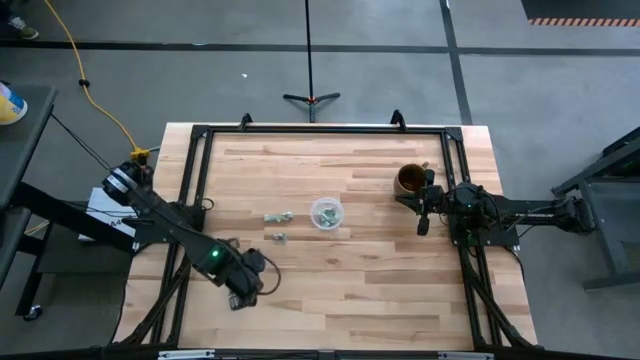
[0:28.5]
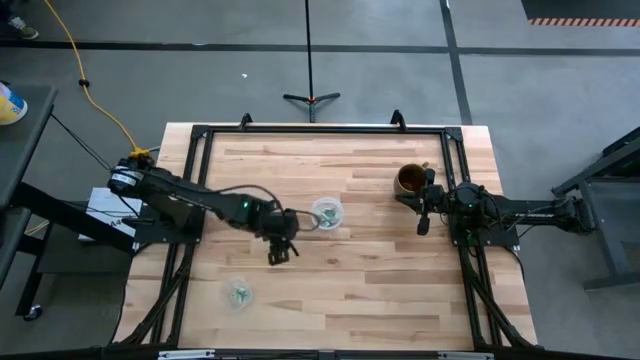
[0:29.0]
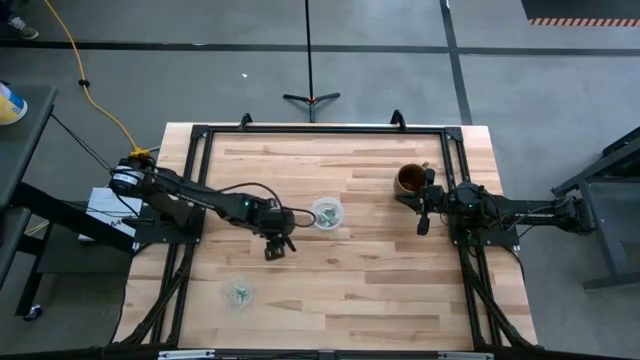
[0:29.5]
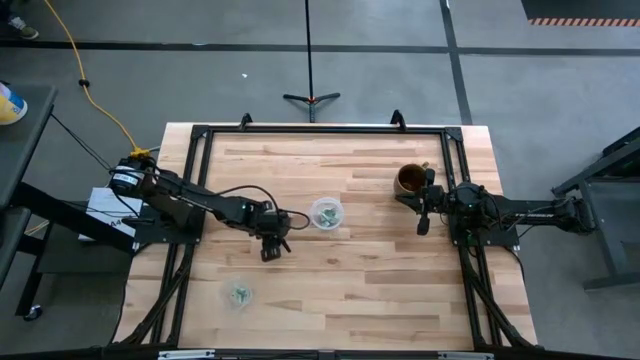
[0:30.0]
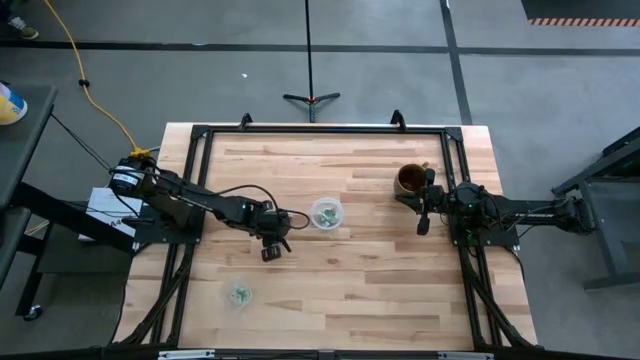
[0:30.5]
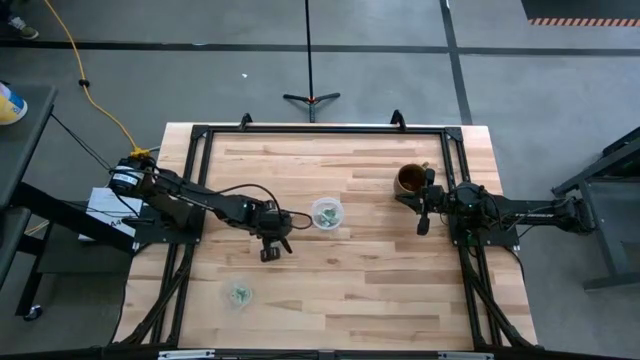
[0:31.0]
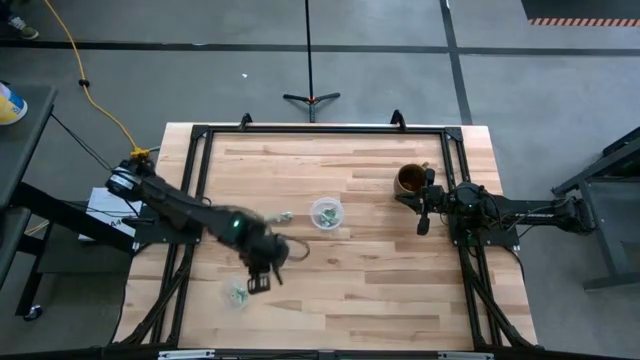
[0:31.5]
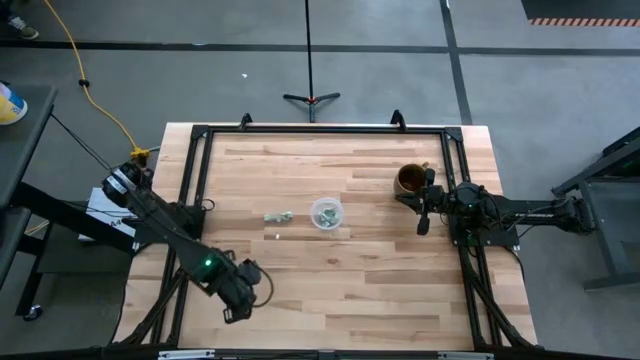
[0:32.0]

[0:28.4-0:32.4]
Task: Pick and place items into bin
Put the green stevia packet into the bottom transparent bin

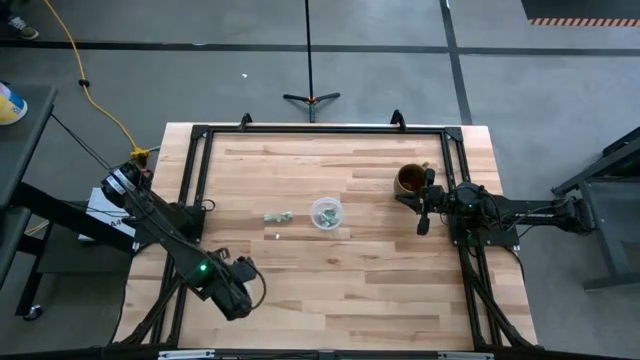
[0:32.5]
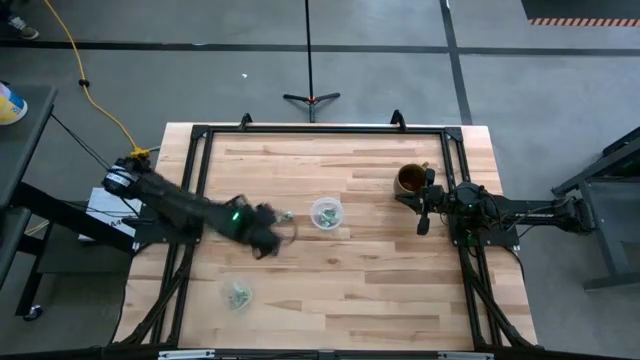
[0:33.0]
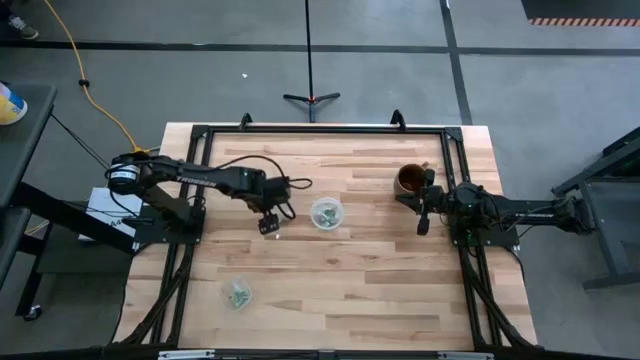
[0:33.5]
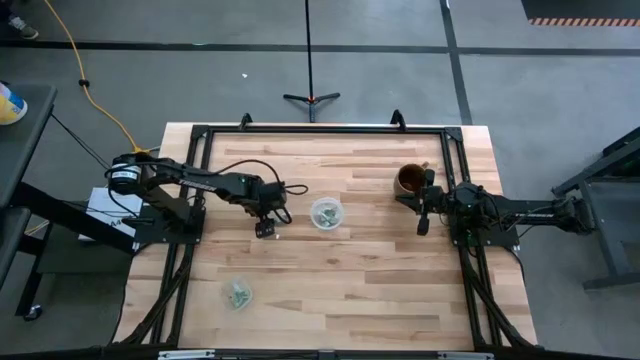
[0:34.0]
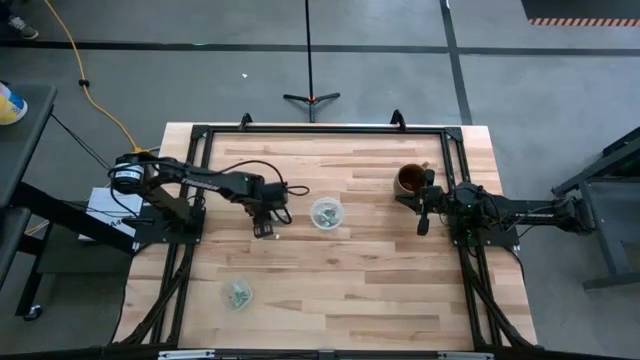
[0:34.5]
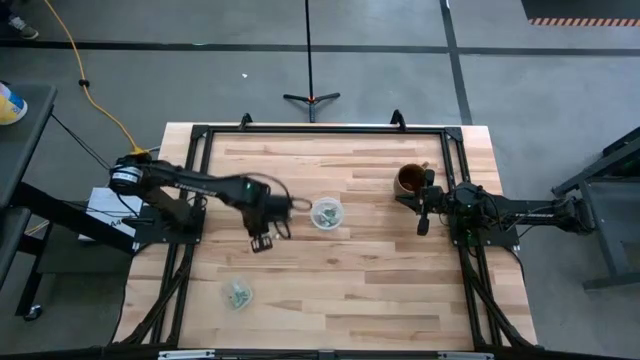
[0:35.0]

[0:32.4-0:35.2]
Put the green stevia packet into the bottom transparent bin

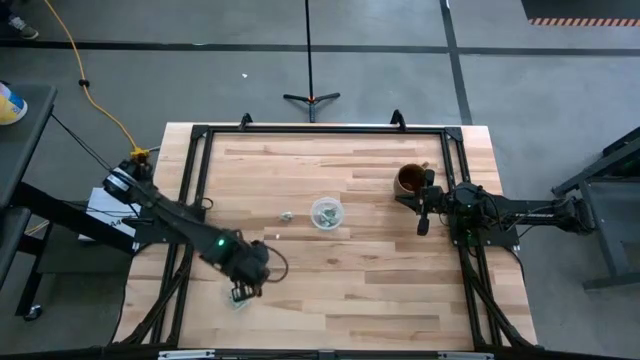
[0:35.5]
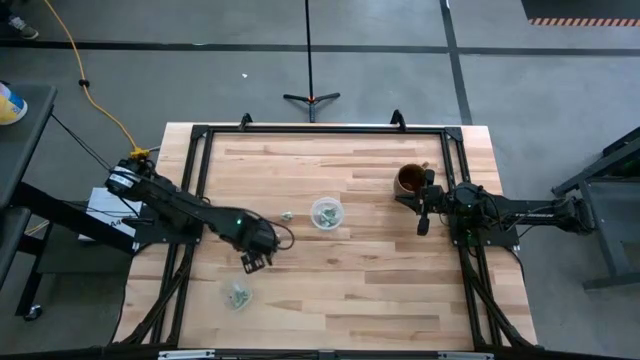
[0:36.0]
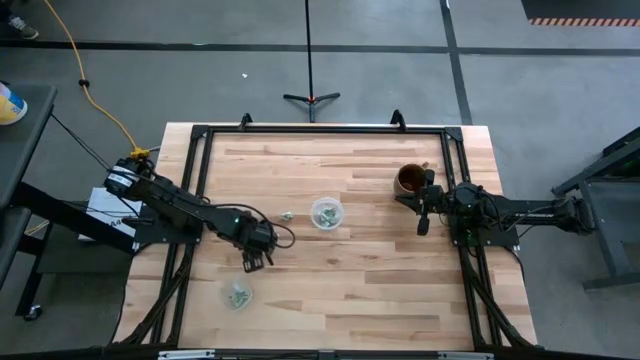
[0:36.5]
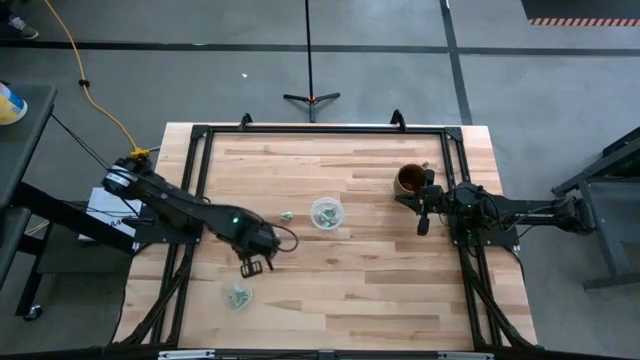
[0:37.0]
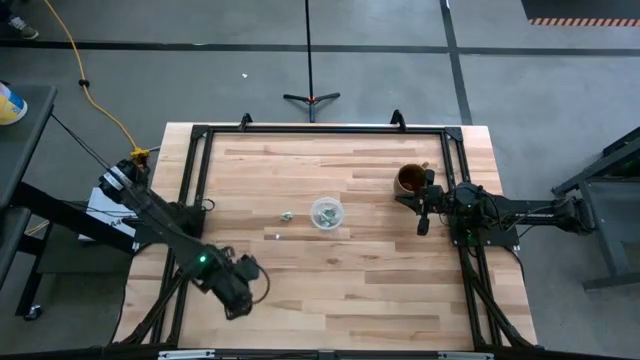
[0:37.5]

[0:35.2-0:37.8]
Put the green stevia packet into the bottom transparent bin

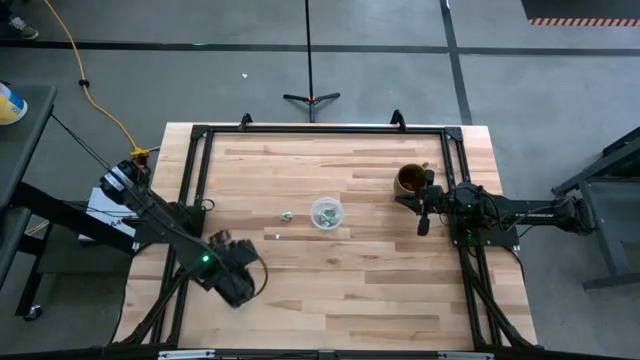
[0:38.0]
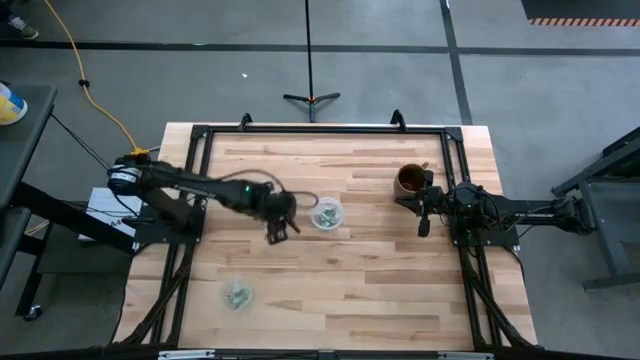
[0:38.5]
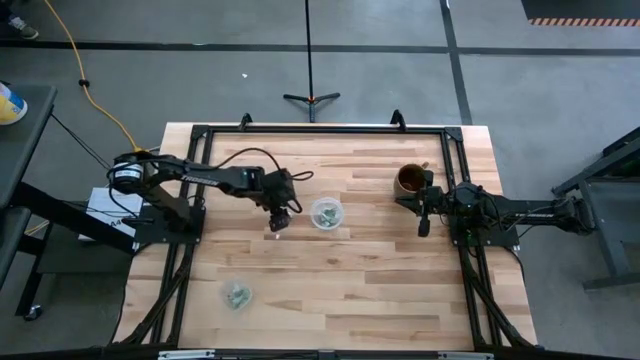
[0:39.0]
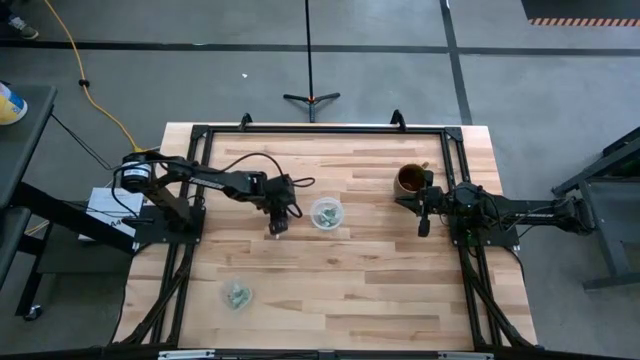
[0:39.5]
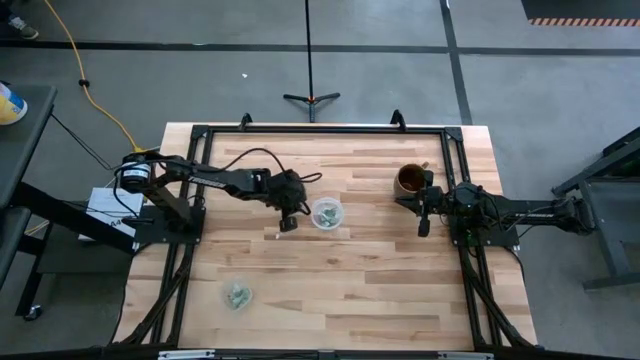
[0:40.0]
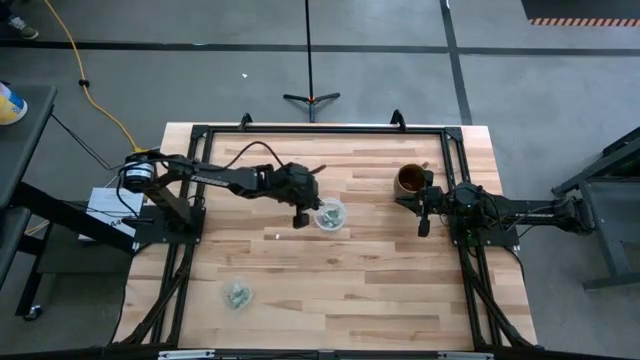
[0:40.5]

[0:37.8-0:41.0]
Put the green stevia packet into the top transparent bin

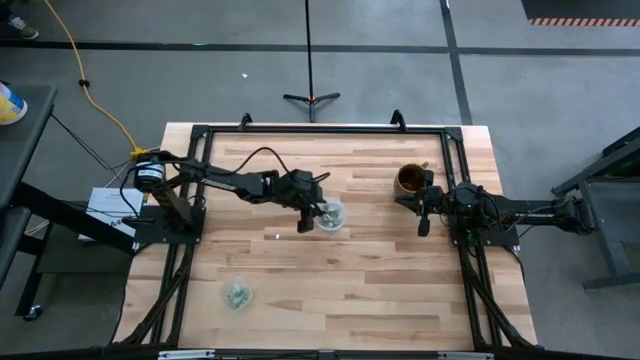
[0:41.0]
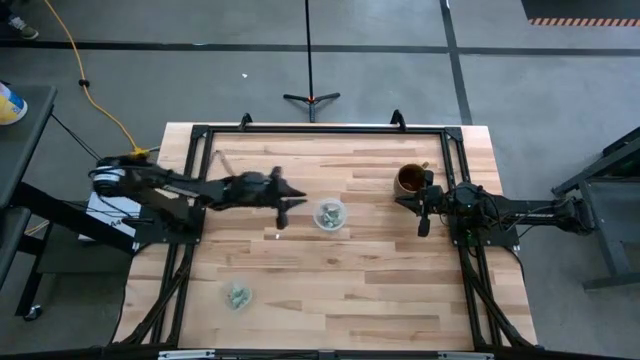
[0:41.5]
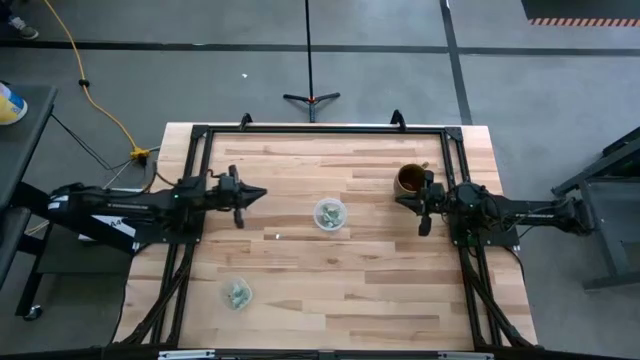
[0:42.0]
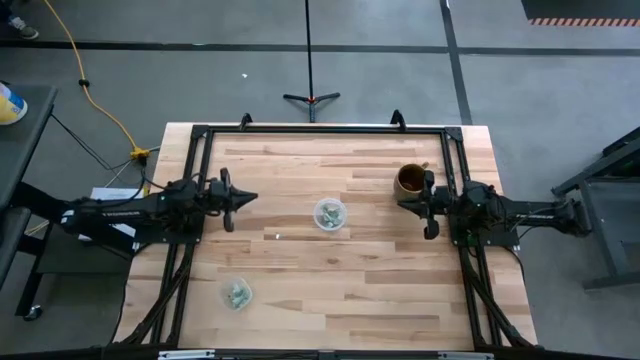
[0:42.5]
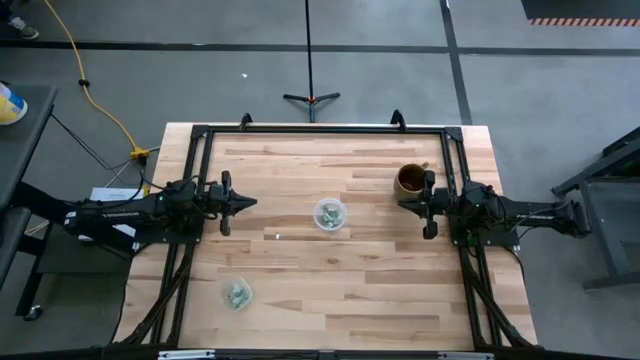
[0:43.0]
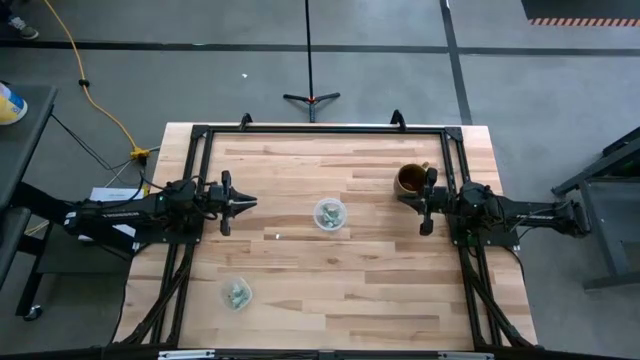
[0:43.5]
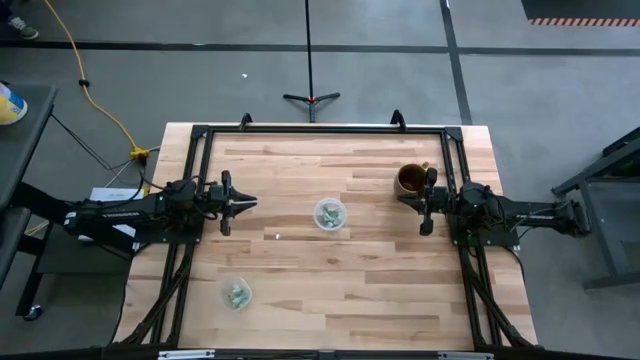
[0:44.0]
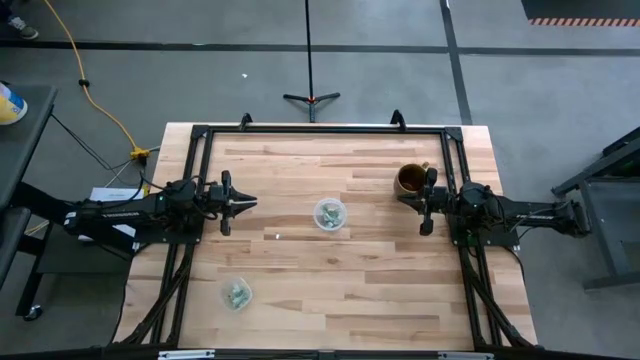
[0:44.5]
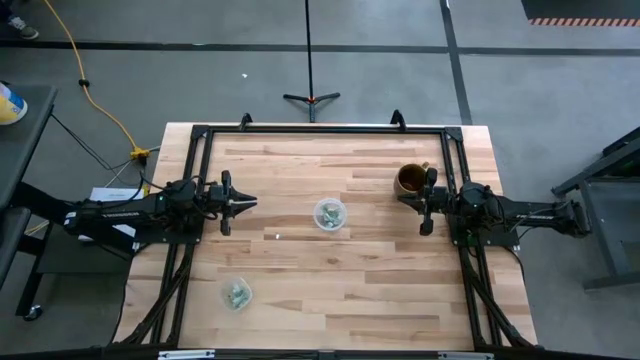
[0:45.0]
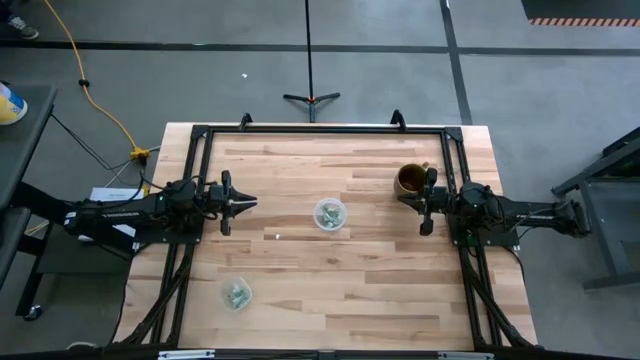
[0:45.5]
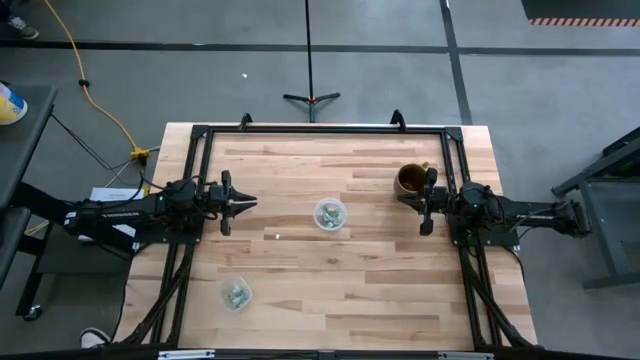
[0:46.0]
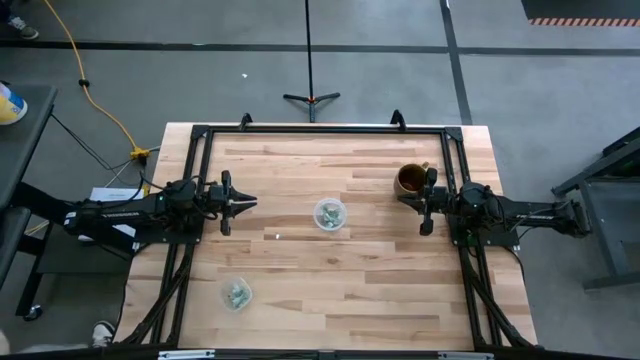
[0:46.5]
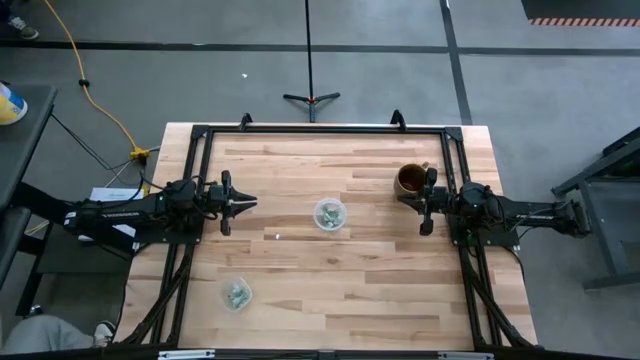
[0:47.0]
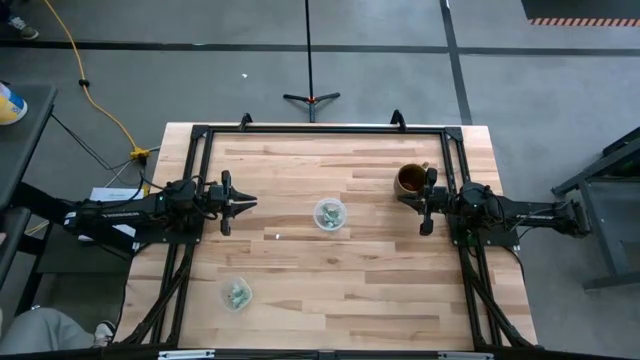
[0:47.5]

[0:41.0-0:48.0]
Return to Home Position

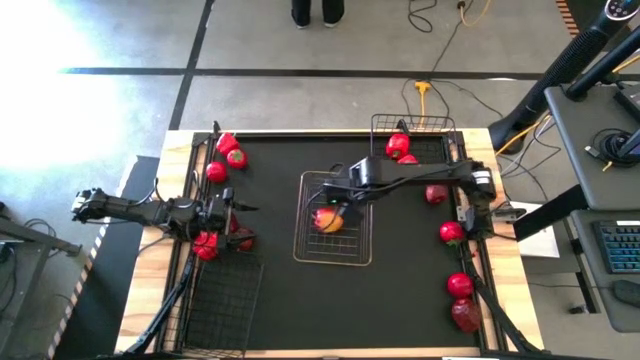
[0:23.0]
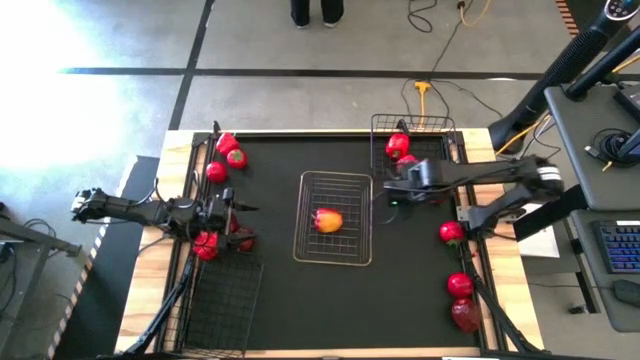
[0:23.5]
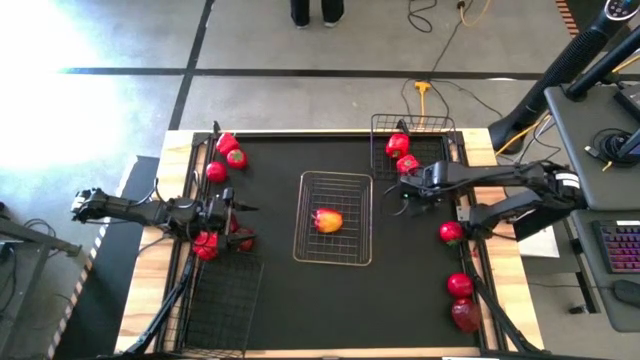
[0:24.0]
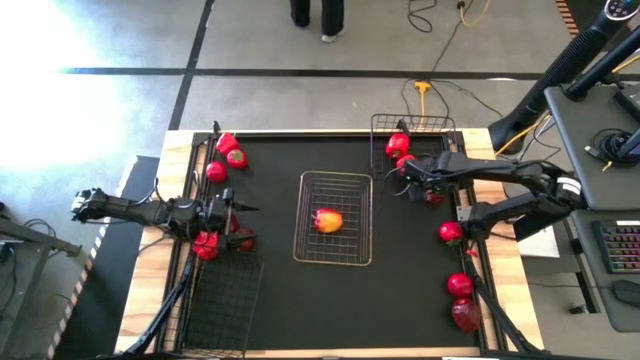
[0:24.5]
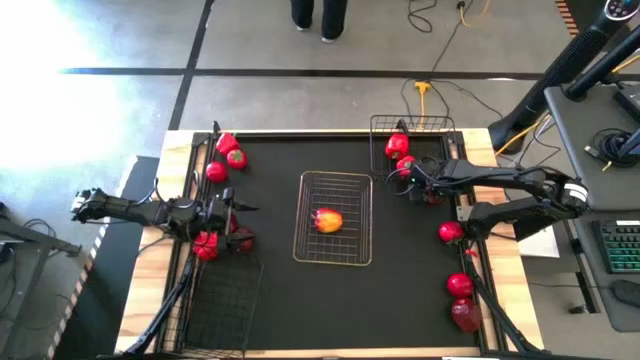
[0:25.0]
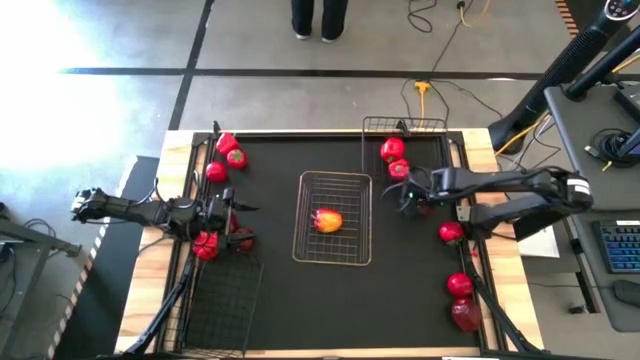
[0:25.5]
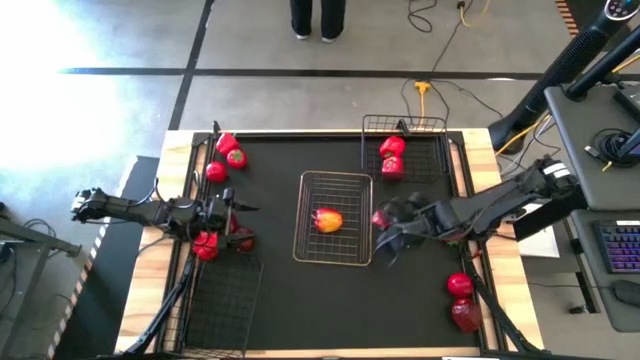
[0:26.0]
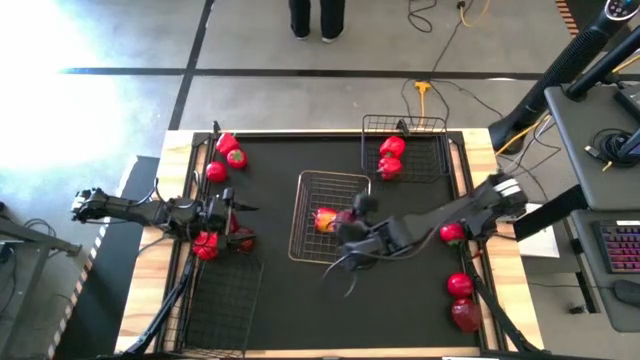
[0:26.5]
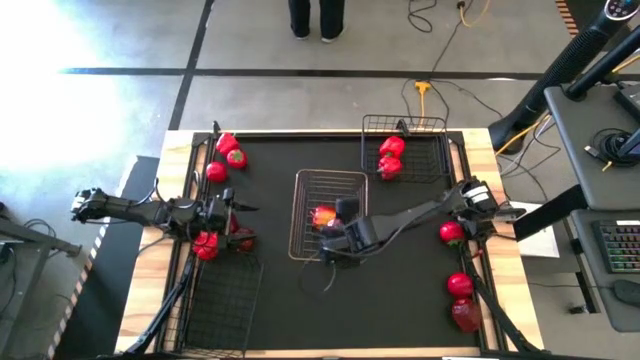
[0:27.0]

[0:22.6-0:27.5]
Task: Sort produce into baskets
Put the red apple into the gold wire basket
